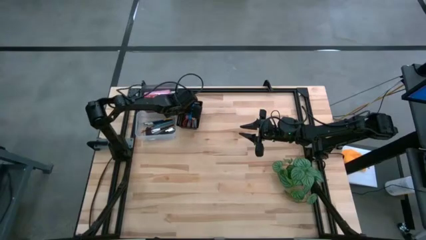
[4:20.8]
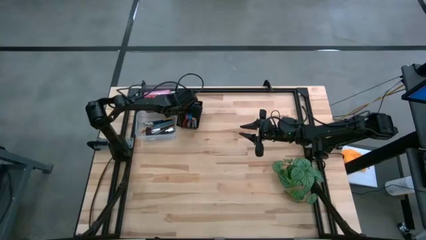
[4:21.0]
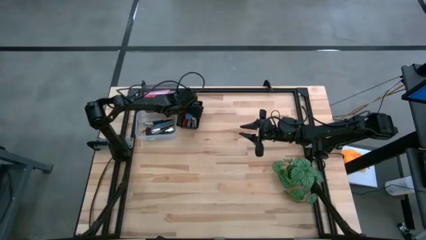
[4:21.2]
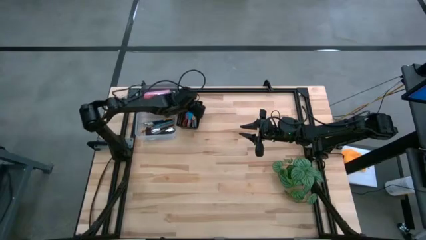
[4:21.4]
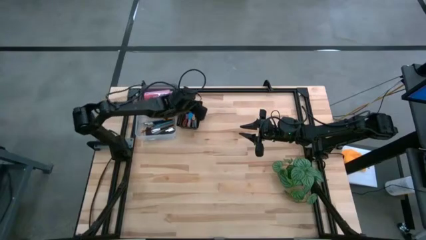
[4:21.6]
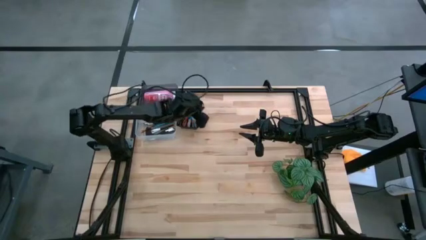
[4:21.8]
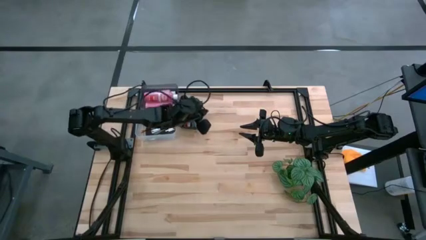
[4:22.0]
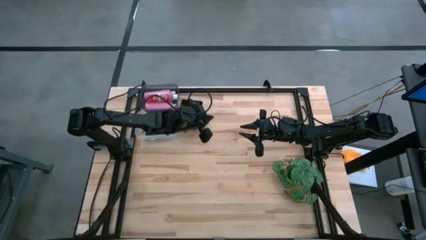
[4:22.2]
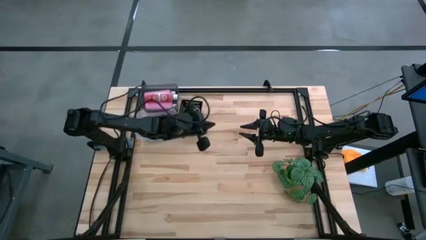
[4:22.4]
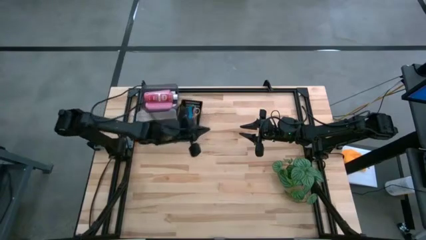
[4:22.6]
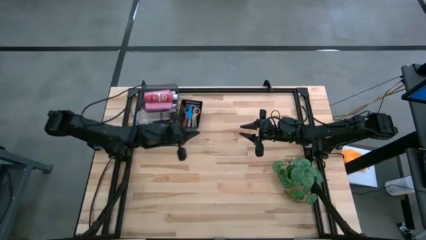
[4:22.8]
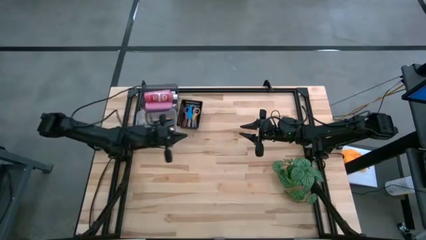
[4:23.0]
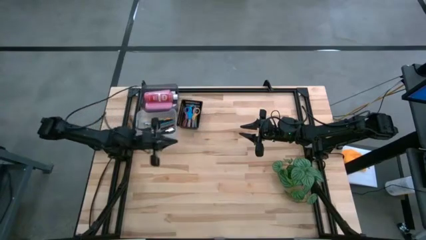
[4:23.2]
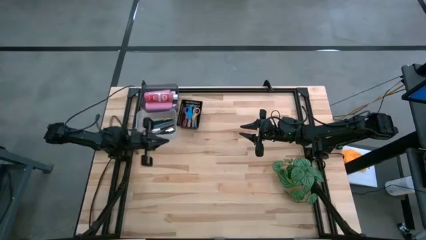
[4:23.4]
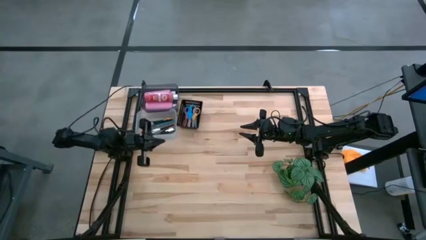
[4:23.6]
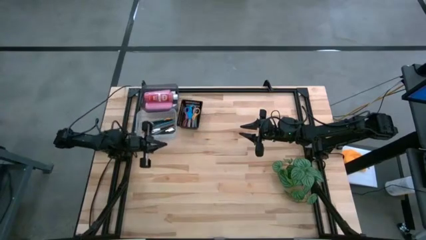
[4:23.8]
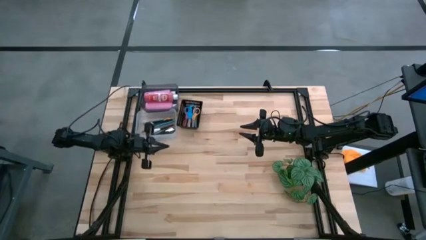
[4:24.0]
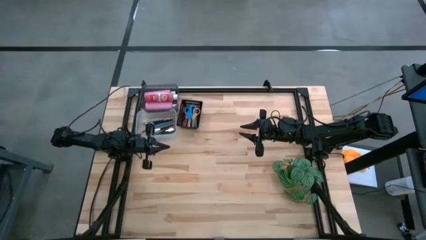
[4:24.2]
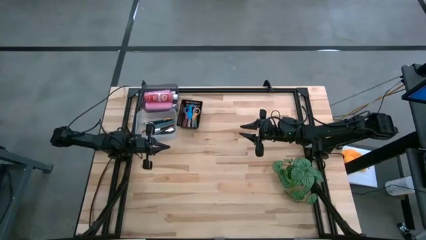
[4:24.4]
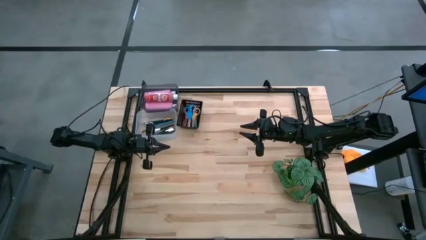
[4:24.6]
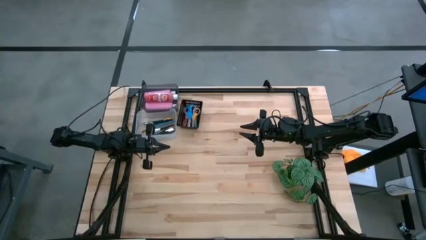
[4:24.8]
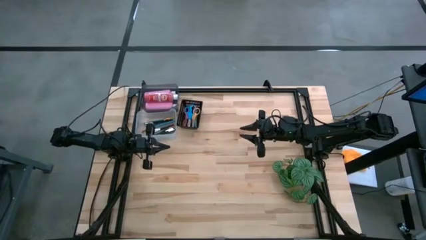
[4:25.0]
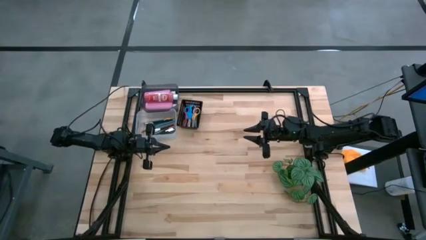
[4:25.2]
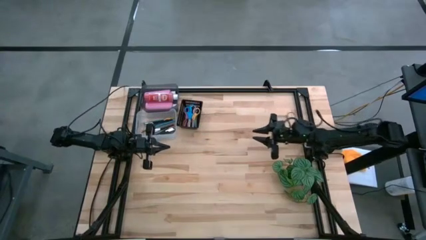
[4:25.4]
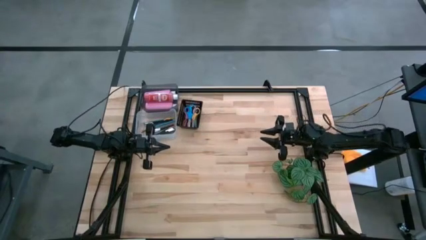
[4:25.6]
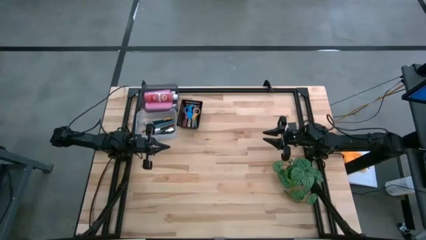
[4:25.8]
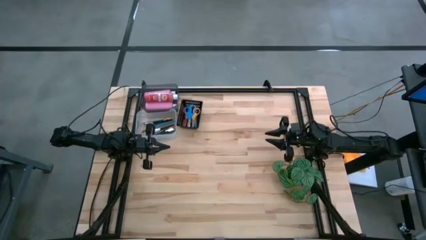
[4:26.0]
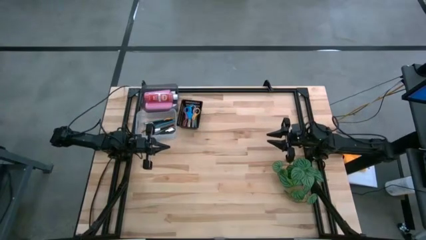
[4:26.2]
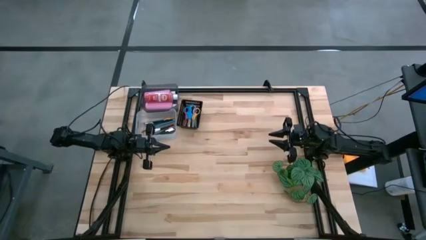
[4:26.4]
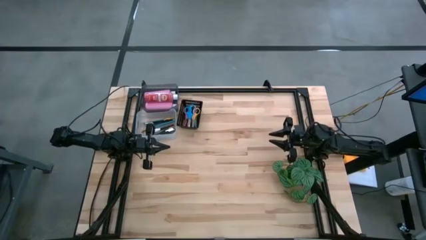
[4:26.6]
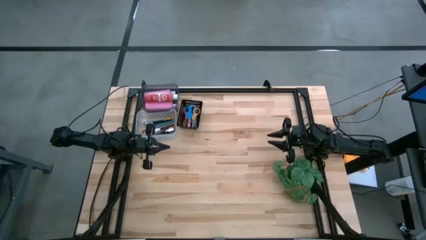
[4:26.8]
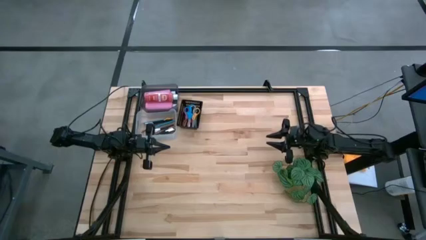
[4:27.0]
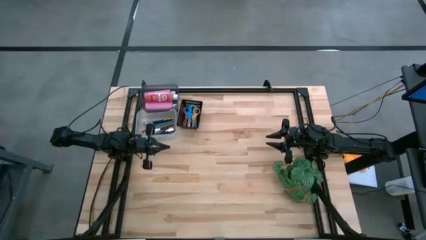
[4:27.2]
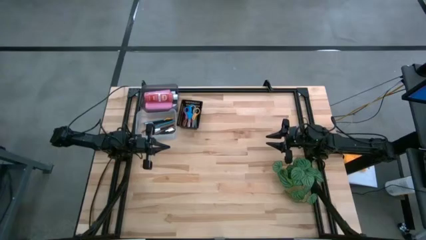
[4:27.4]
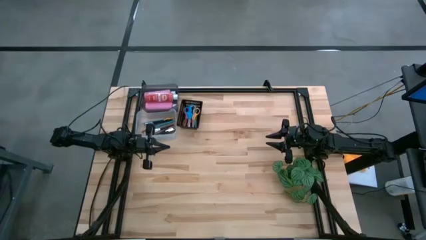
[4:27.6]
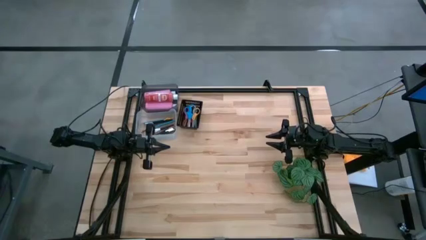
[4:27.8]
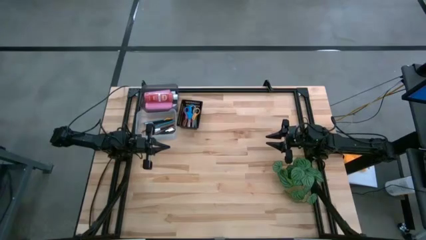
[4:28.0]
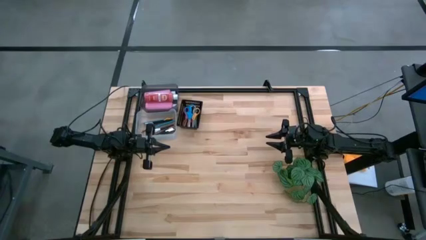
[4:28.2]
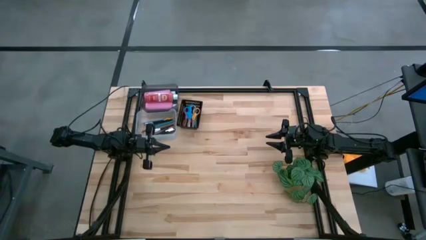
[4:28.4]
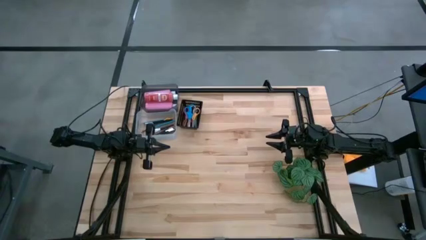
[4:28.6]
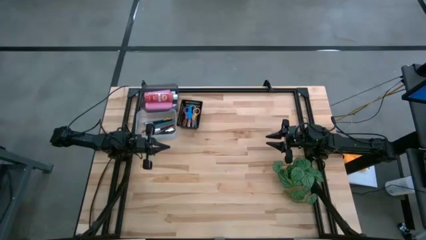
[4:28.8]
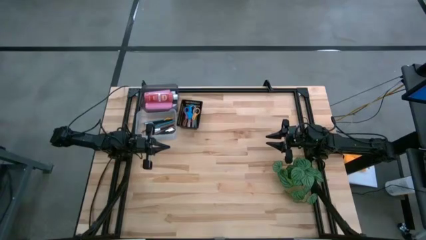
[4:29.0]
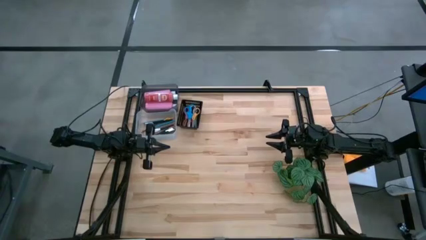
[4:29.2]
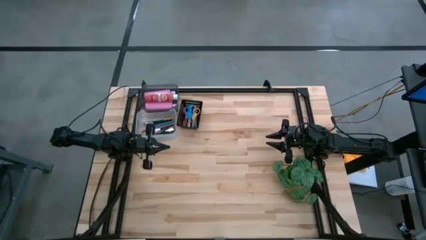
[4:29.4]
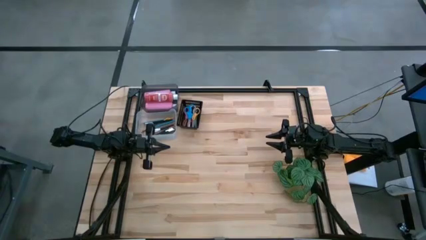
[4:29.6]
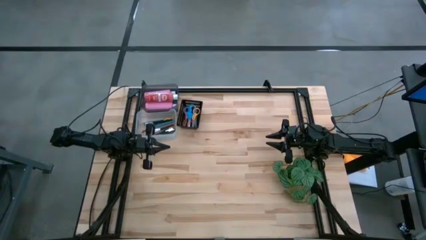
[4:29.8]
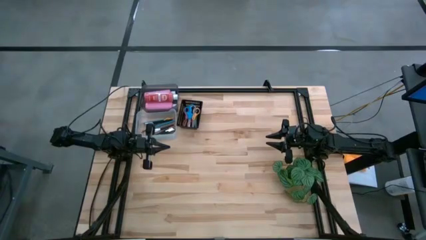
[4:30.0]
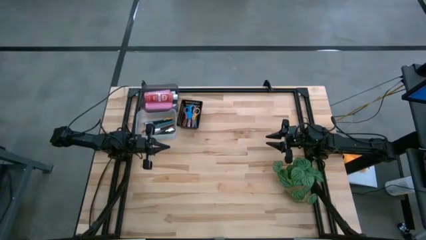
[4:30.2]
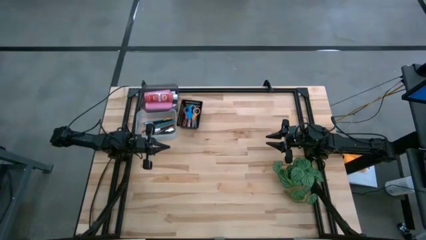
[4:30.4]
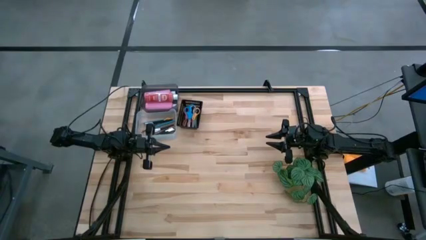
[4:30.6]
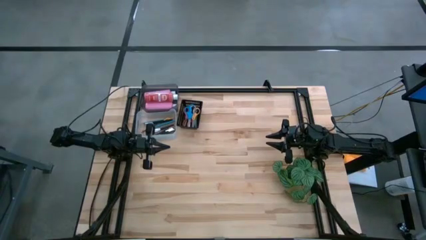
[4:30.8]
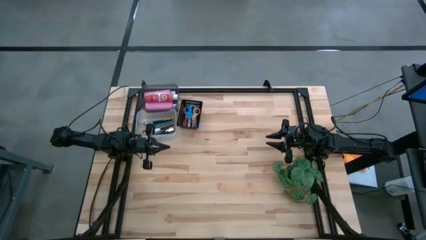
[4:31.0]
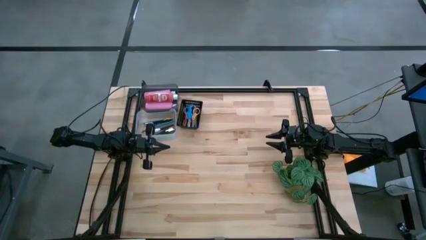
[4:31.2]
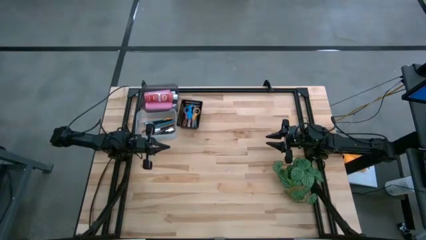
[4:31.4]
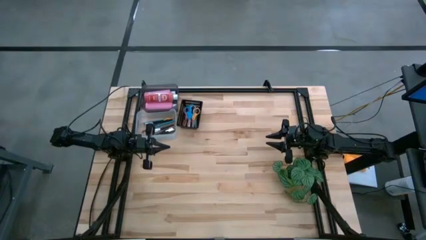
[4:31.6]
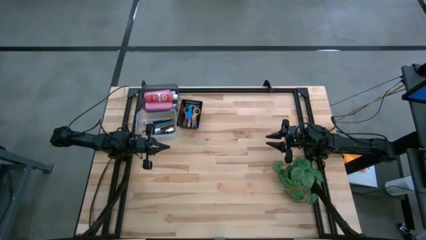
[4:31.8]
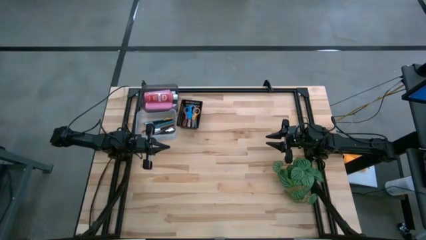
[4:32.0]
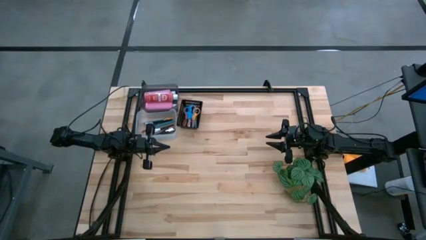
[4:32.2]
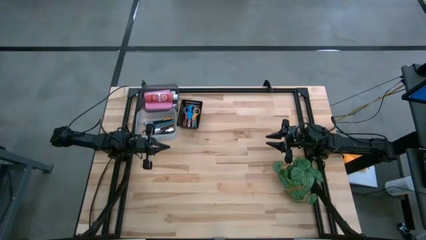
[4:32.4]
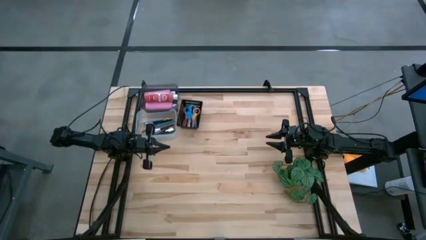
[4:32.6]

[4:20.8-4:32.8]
Task: Pick & Place Paint Supplies
Return to Home Position

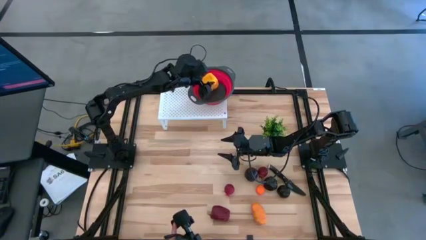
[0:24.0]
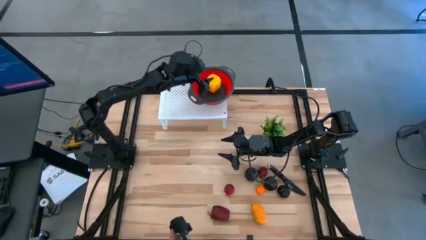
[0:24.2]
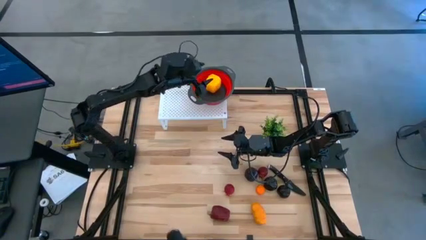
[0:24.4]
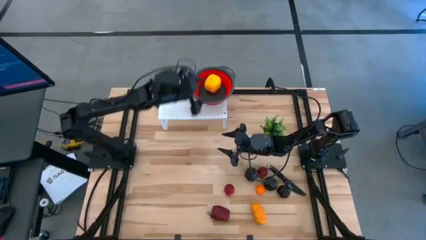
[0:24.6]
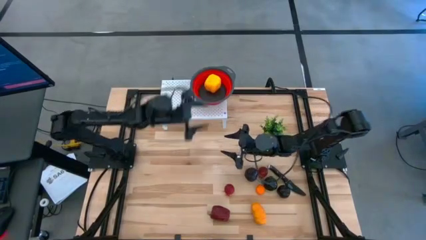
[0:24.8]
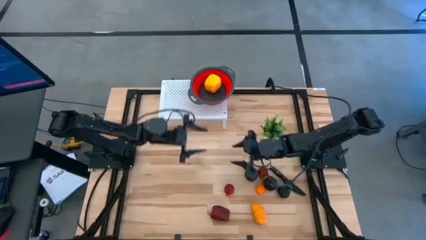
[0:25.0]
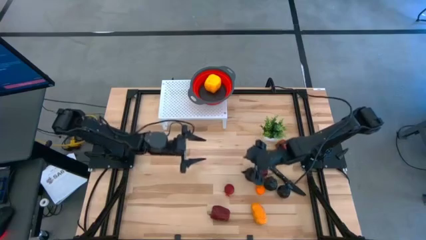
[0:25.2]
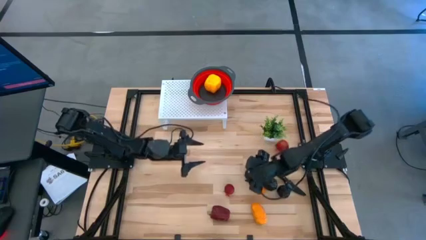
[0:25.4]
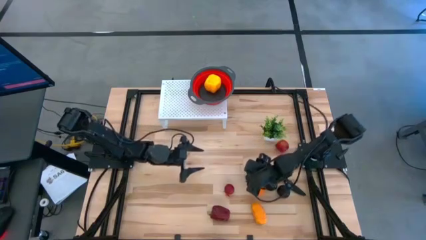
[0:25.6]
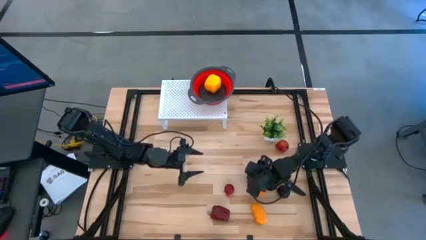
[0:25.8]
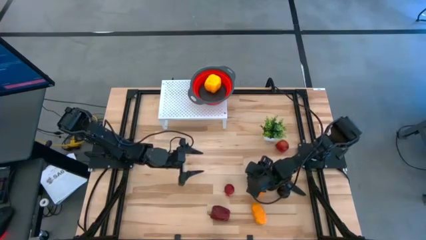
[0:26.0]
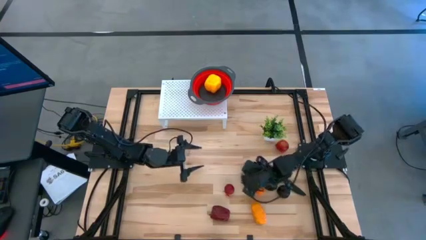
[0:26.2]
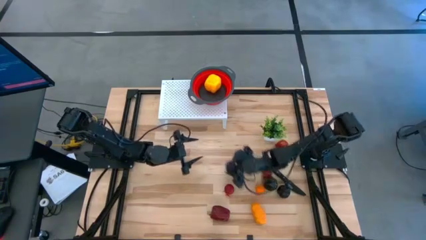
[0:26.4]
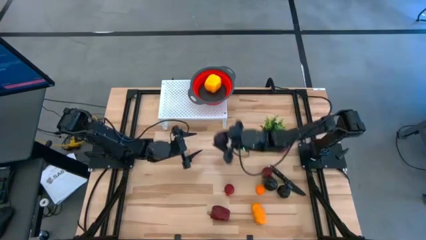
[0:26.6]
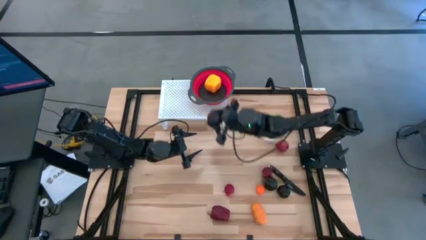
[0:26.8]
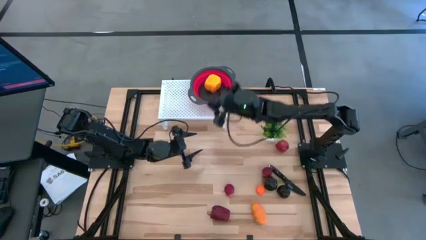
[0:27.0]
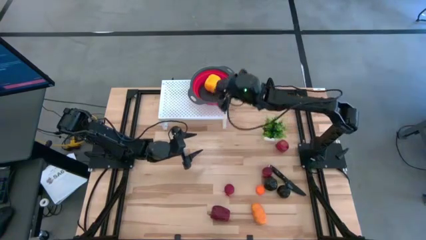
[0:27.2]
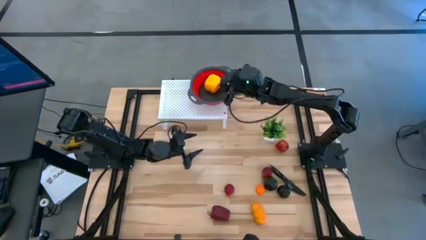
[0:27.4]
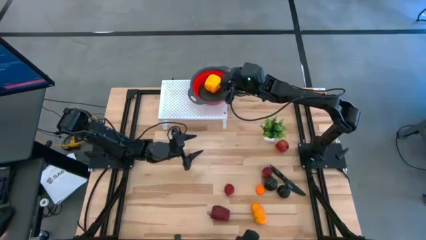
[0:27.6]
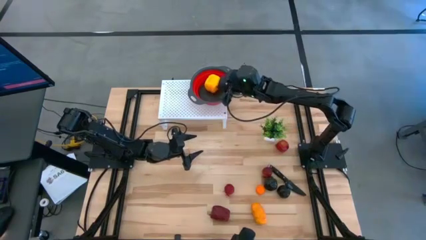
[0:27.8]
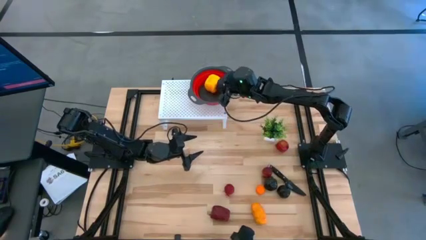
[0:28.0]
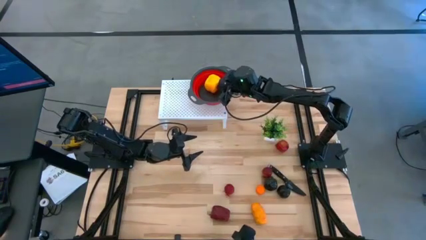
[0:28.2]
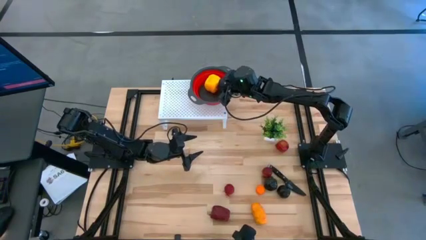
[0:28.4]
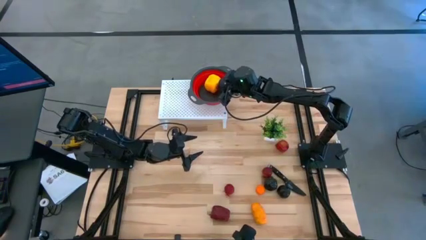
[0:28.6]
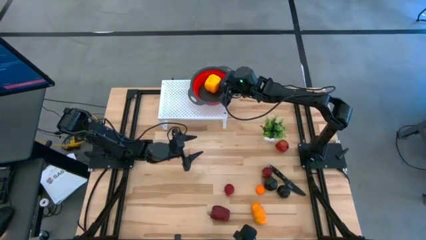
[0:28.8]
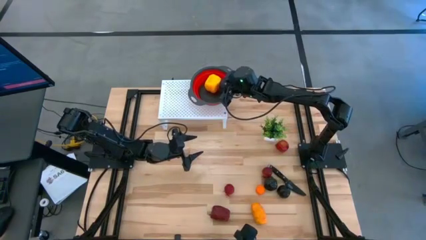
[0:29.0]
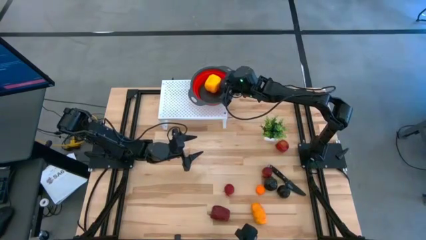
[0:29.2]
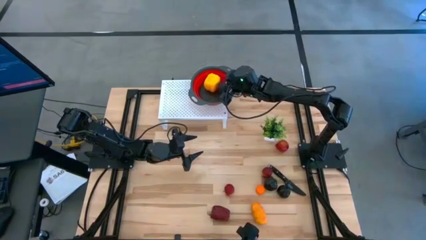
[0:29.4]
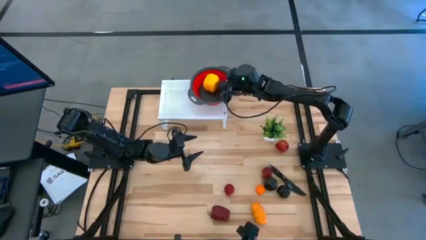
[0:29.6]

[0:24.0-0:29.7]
Task: Pick & Place Fruit
Put the left black plum into the red strainer bowl on the shelf
